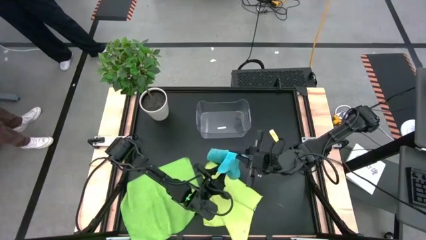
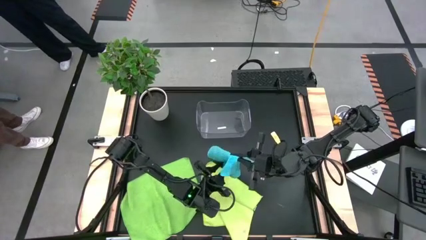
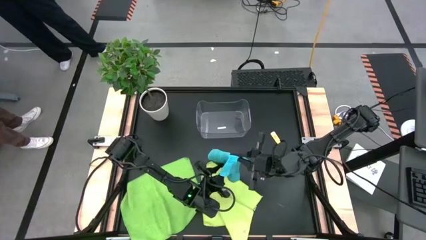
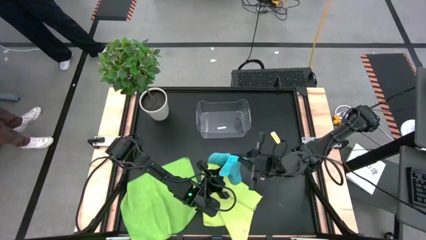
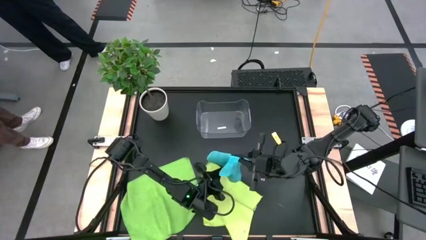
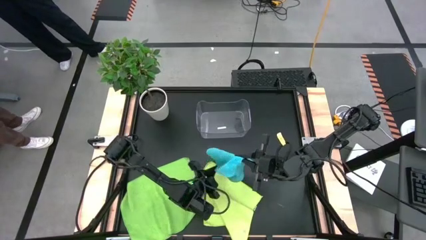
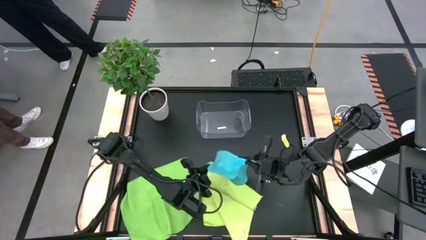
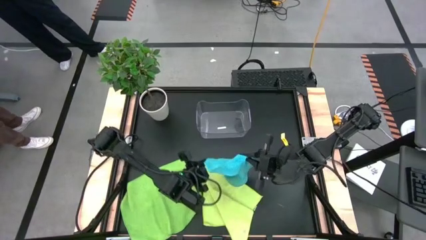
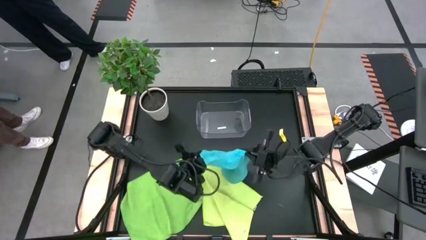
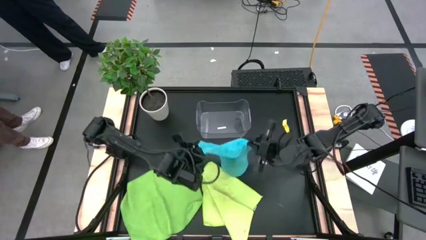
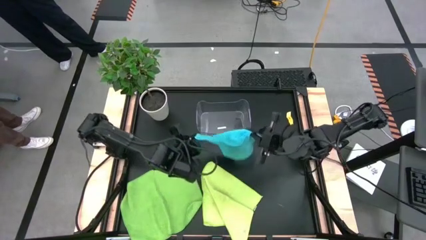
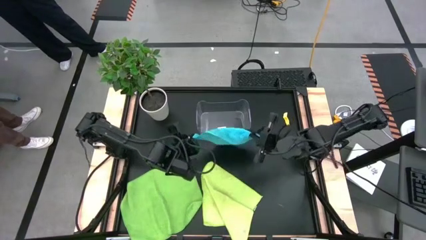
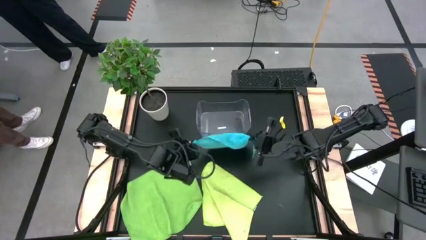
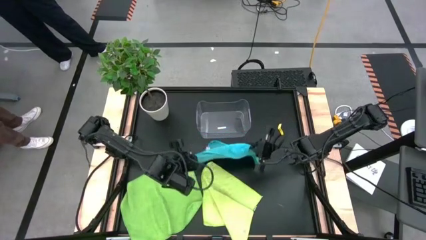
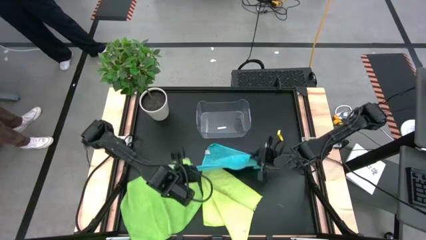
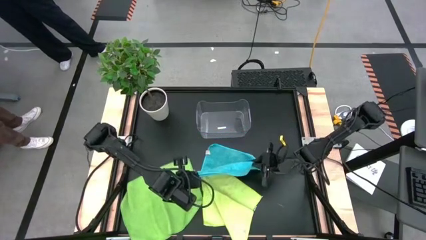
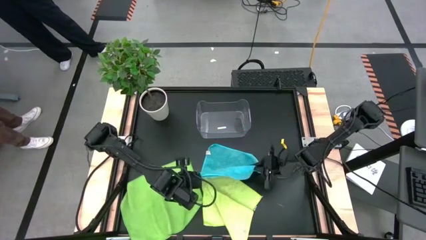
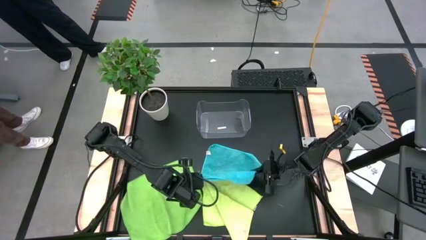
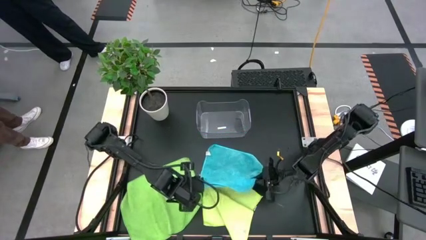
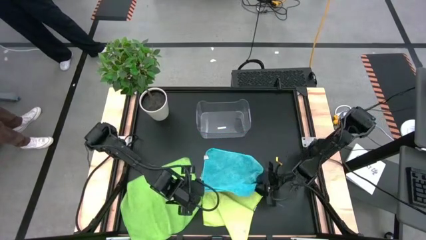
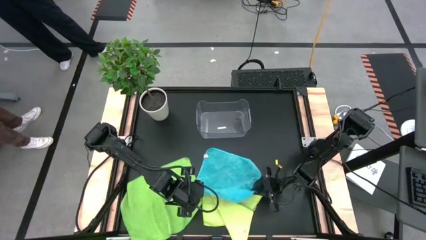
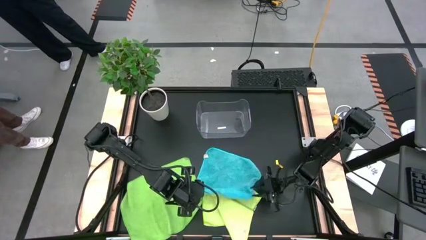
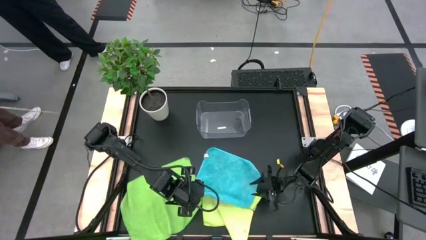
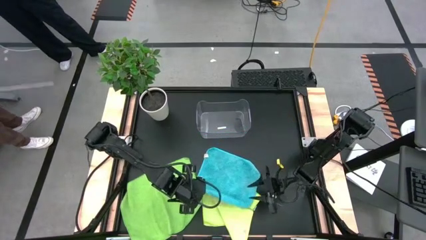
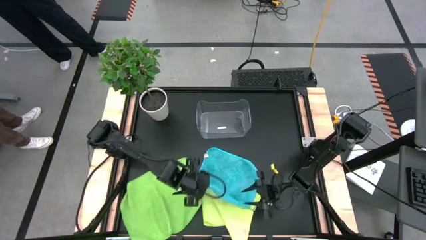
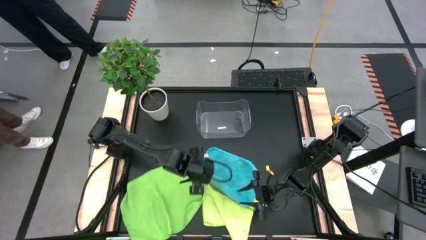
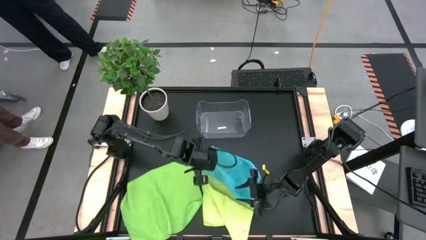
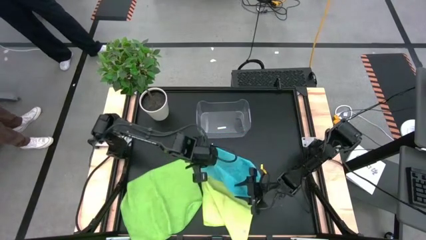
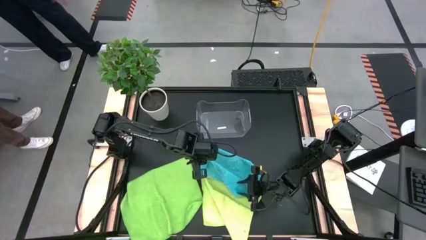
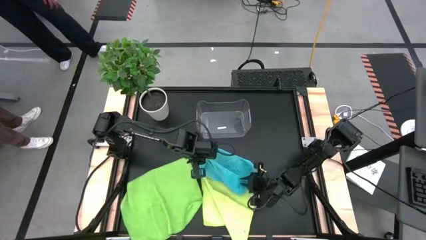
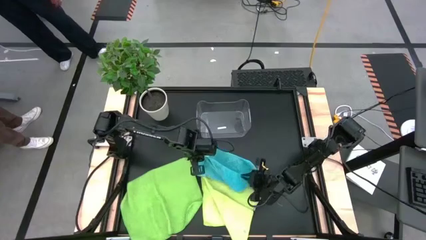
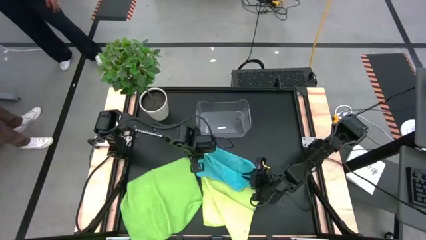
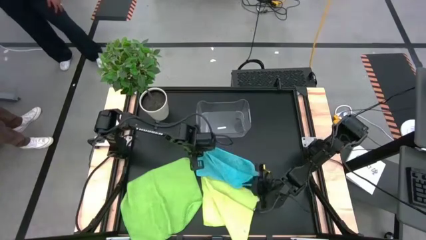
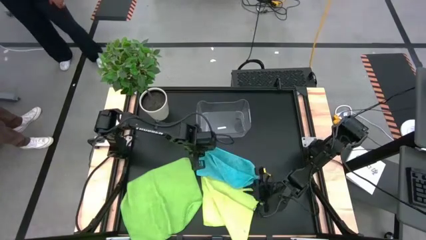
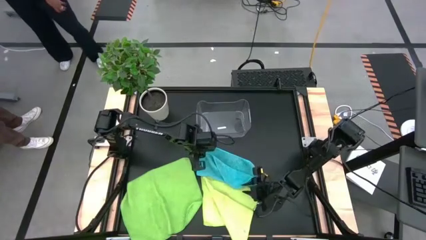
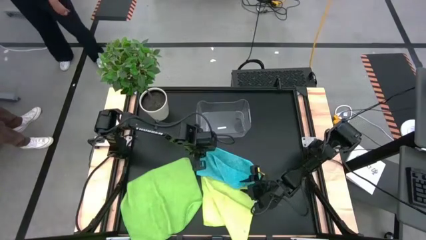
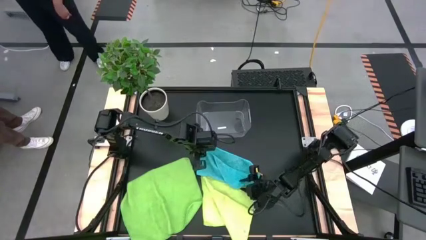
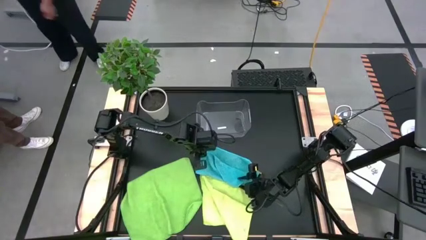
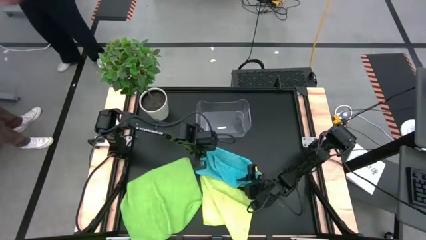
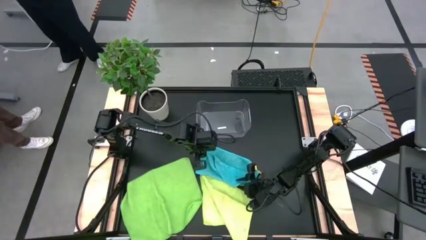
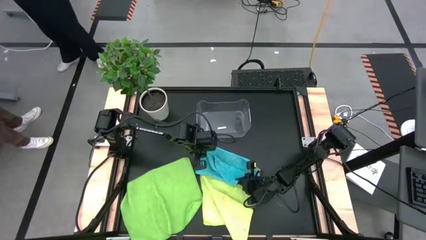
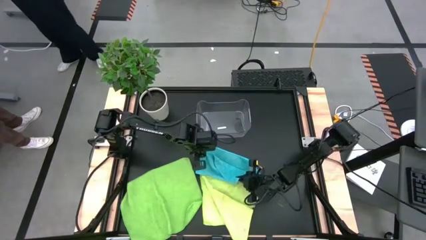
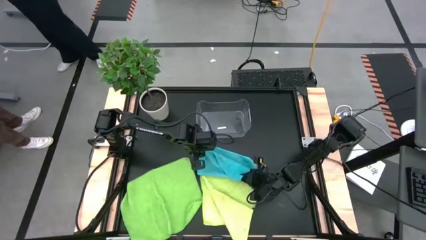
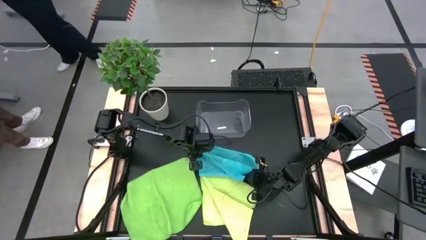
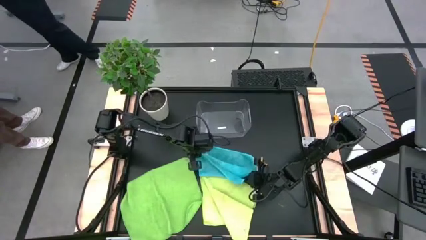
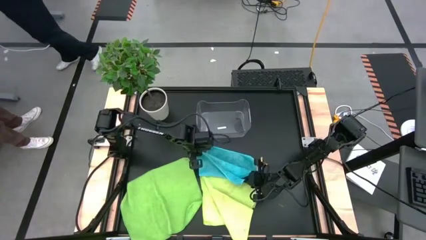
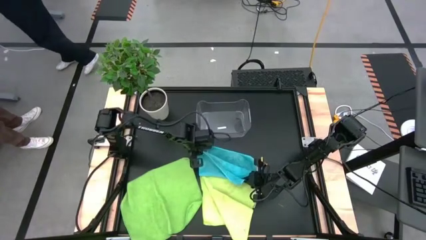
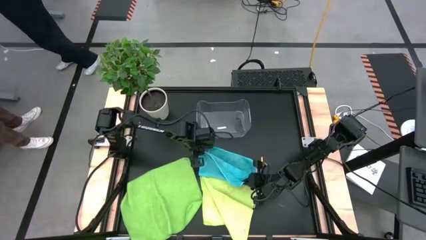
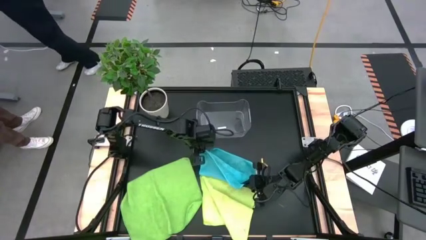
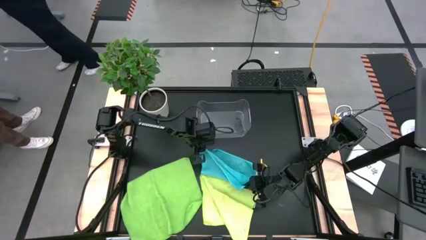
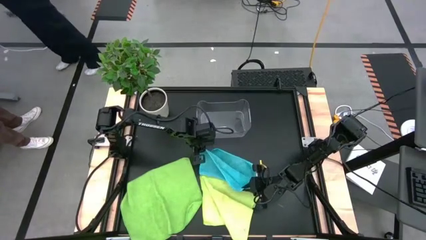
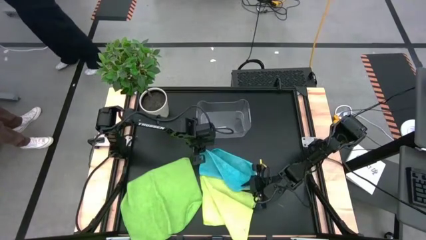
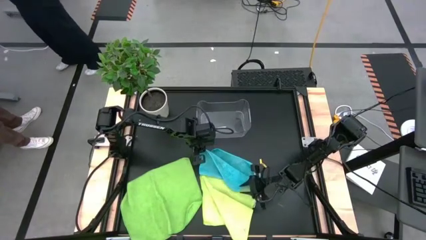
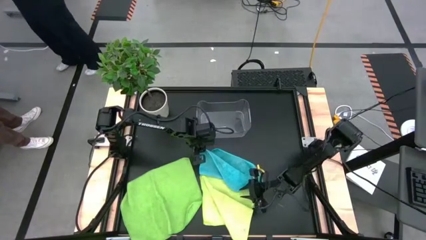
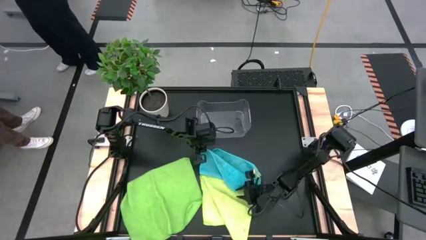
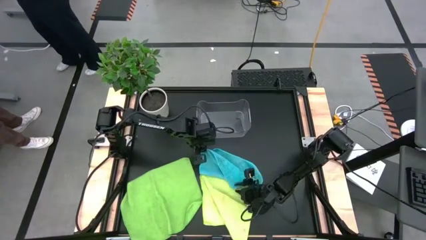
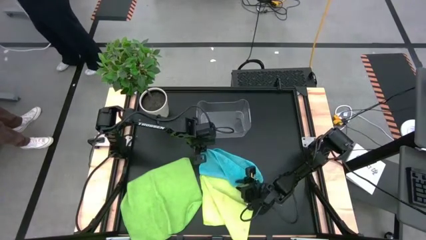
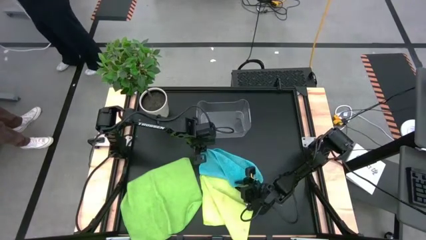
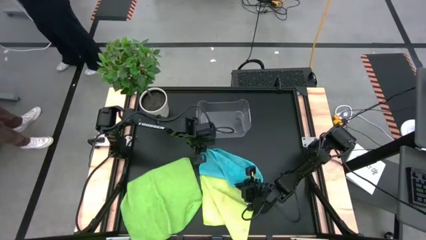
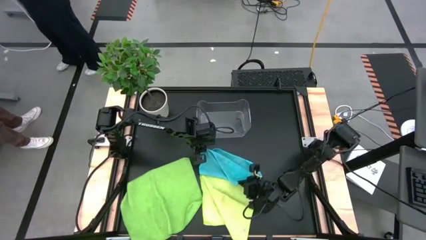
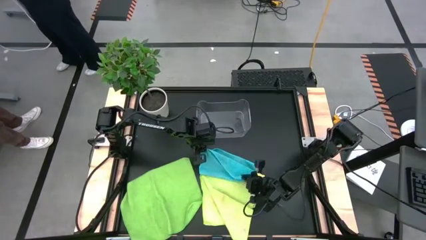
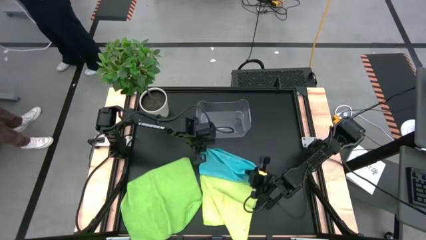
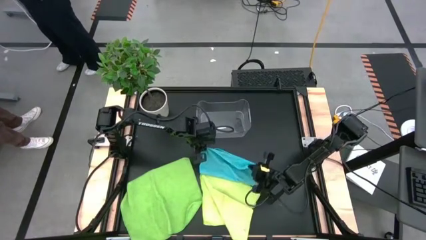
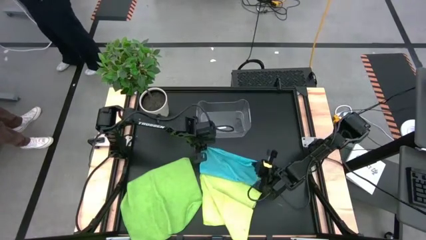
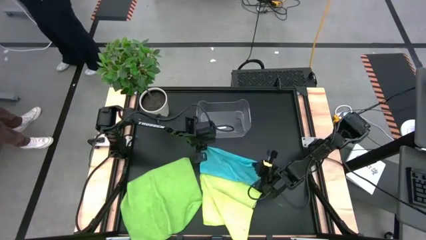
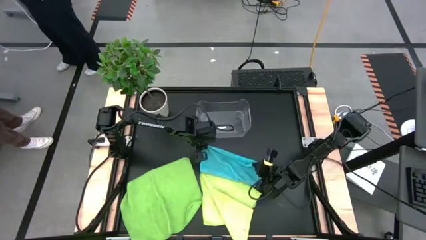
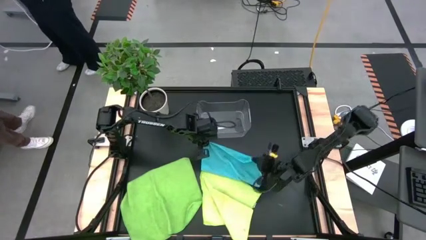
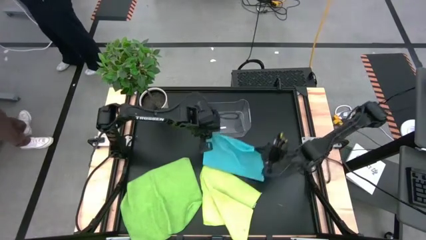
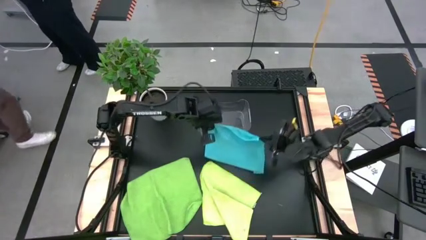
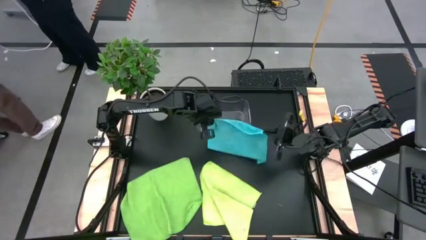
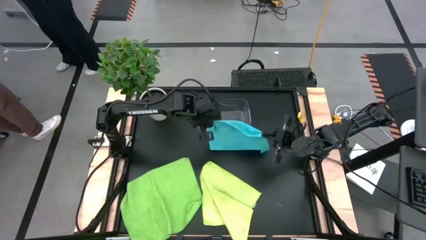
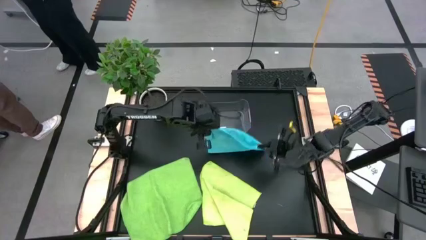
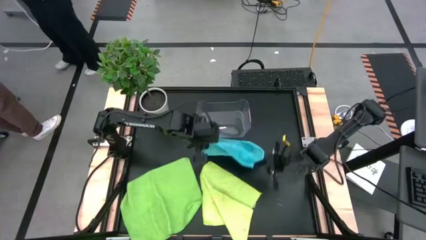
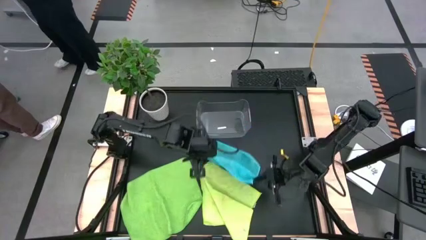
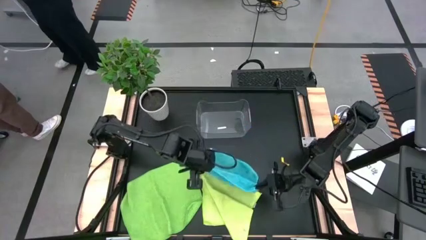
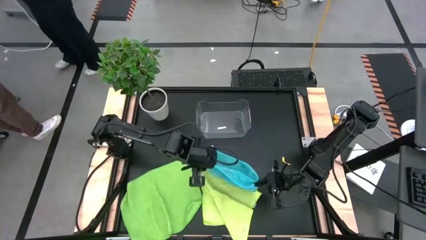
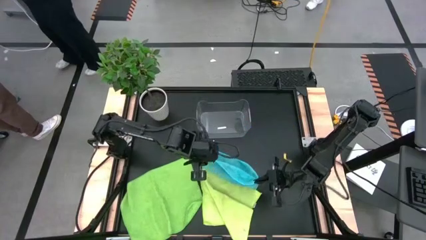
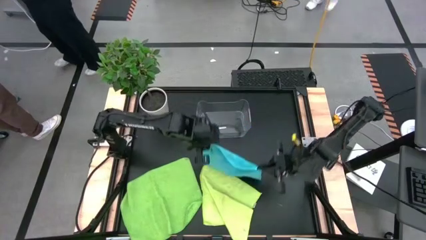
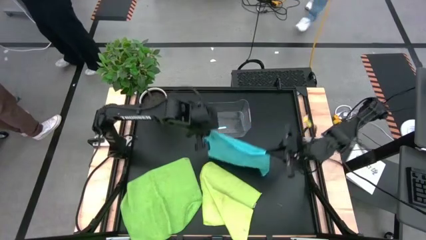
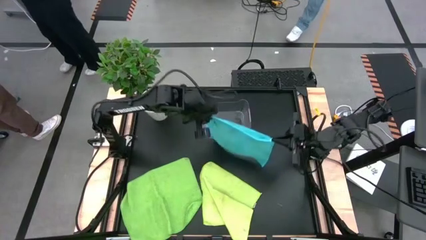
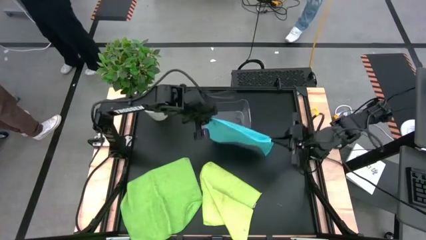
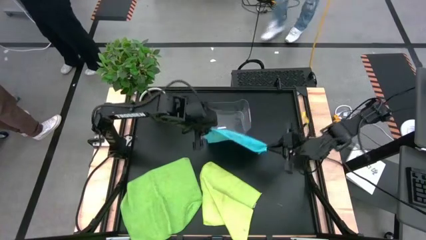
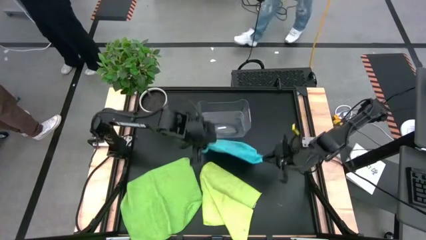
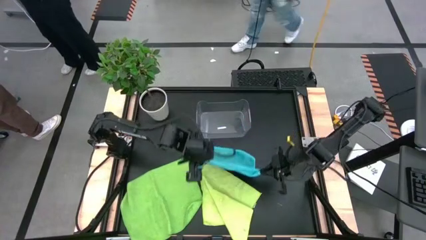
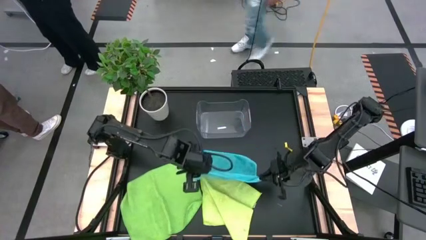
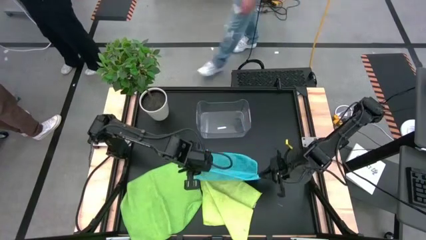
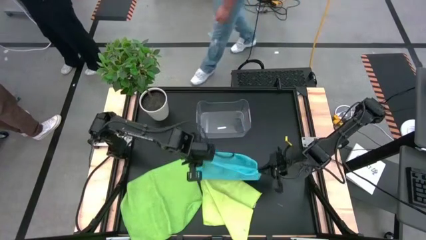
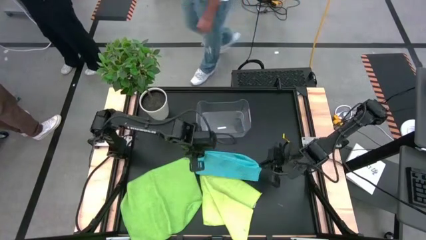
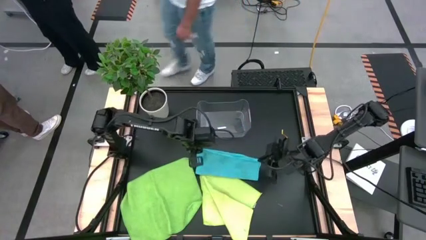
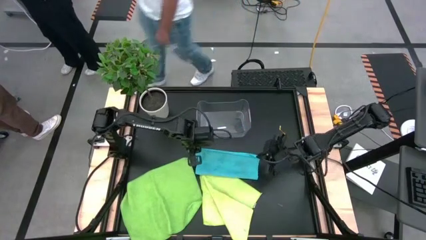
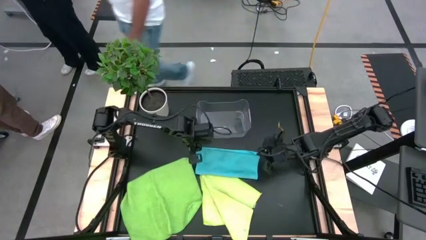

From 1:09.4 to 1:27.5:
Task: Fold microfiber towels
Fold the blue towel
